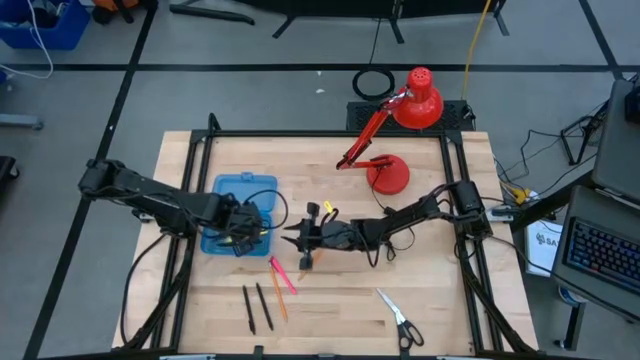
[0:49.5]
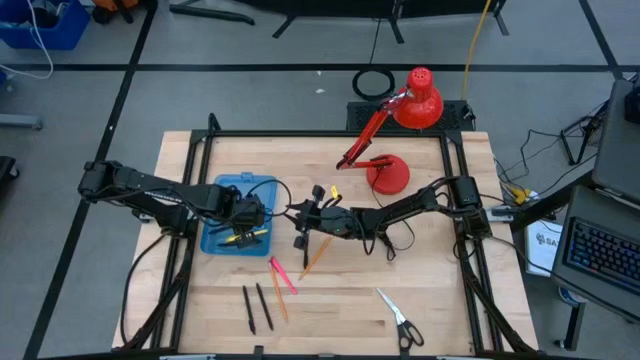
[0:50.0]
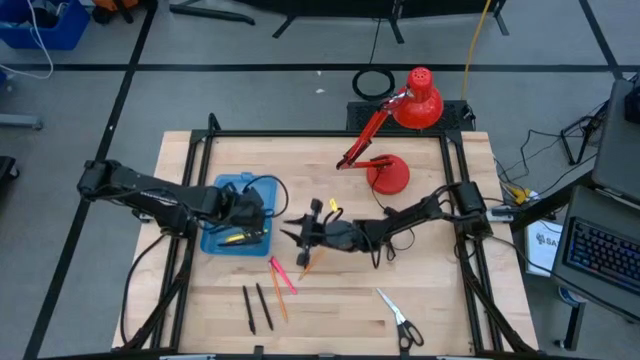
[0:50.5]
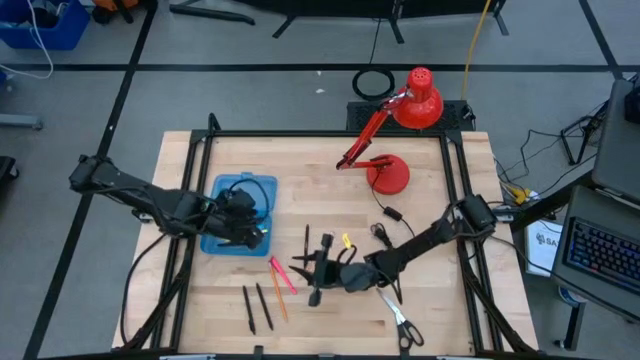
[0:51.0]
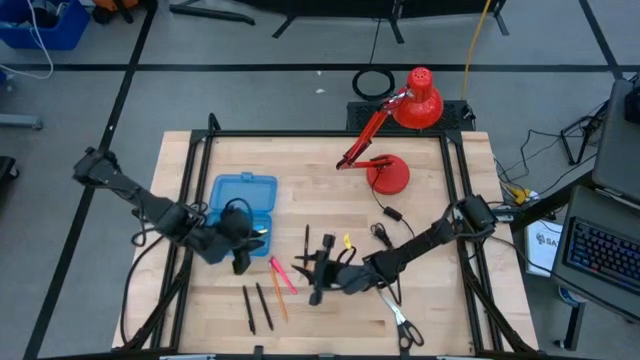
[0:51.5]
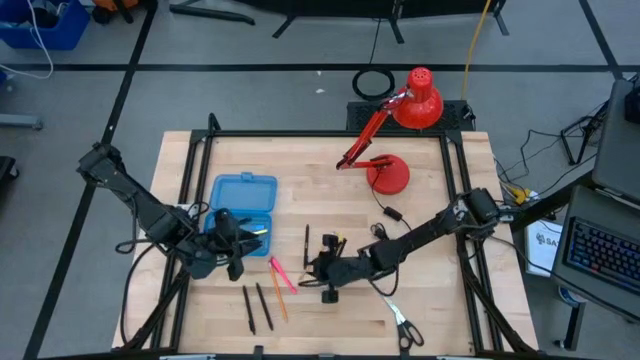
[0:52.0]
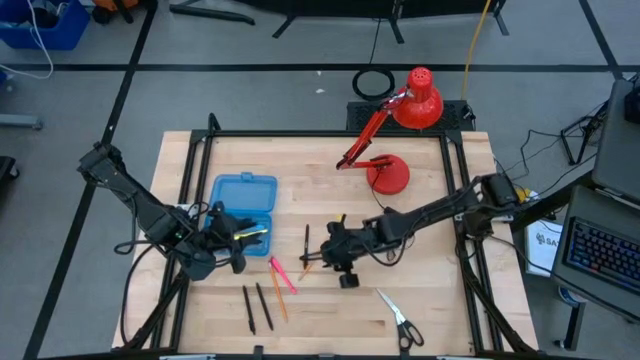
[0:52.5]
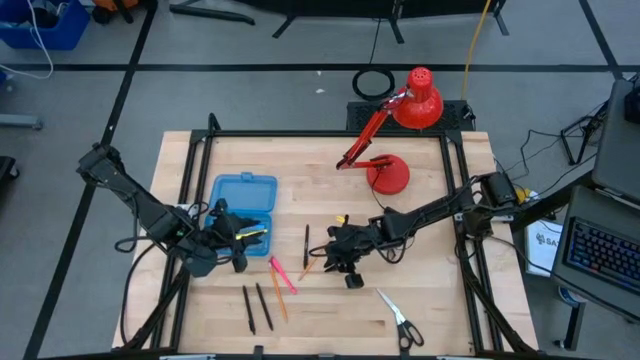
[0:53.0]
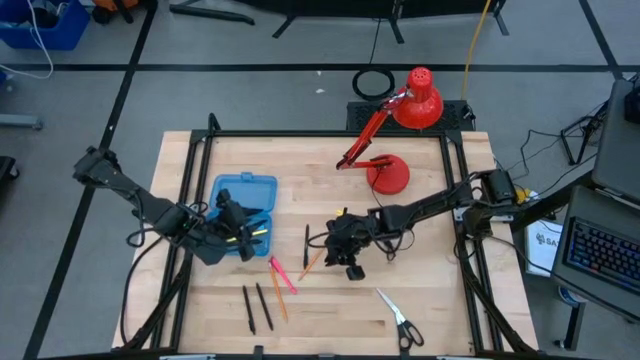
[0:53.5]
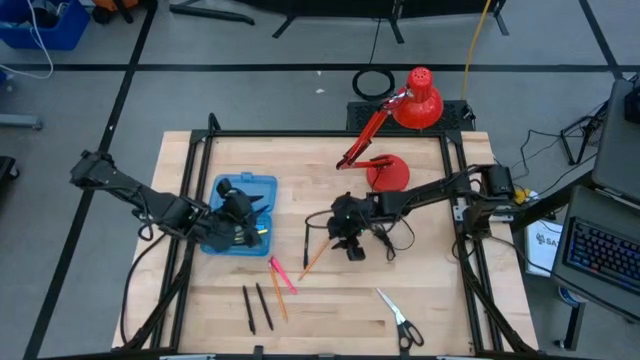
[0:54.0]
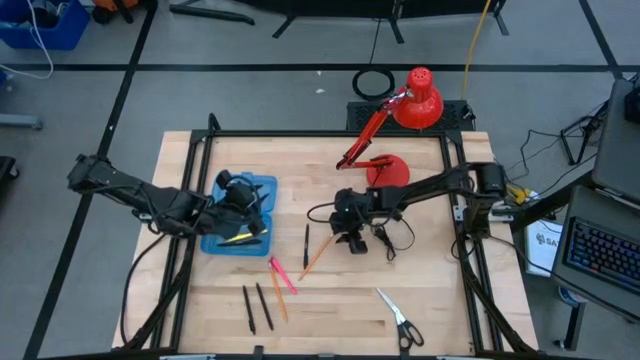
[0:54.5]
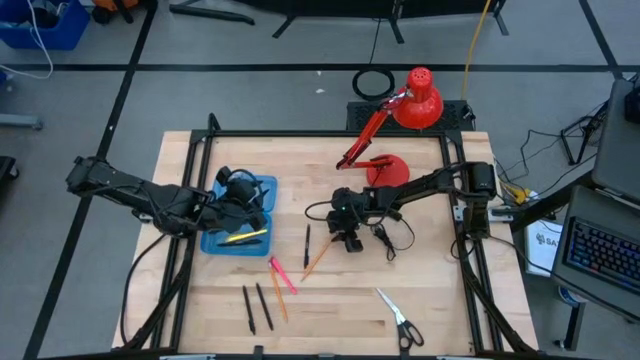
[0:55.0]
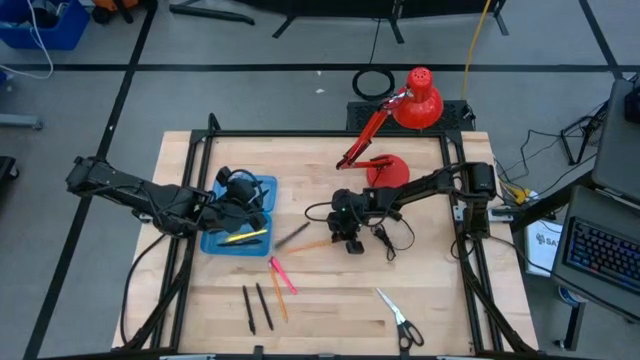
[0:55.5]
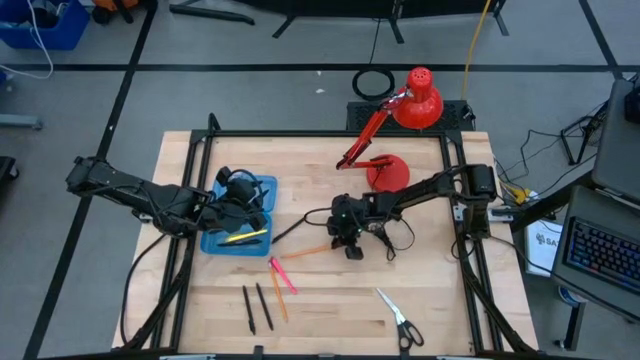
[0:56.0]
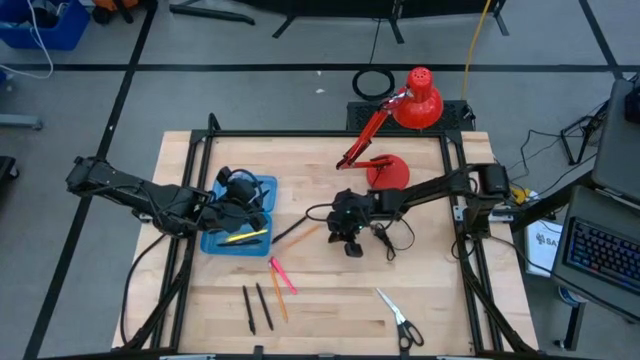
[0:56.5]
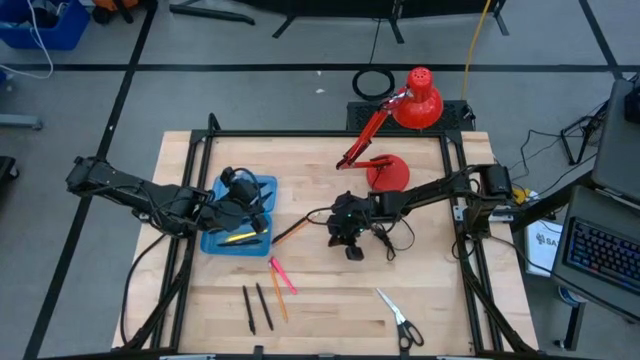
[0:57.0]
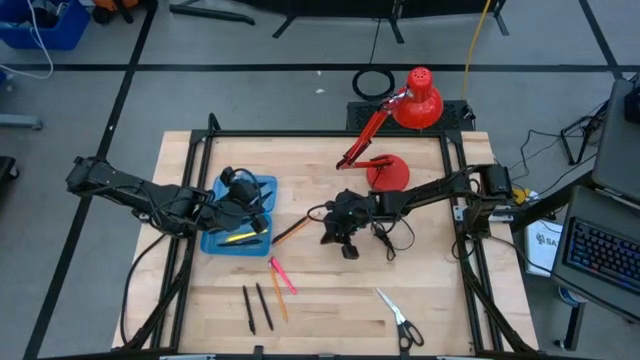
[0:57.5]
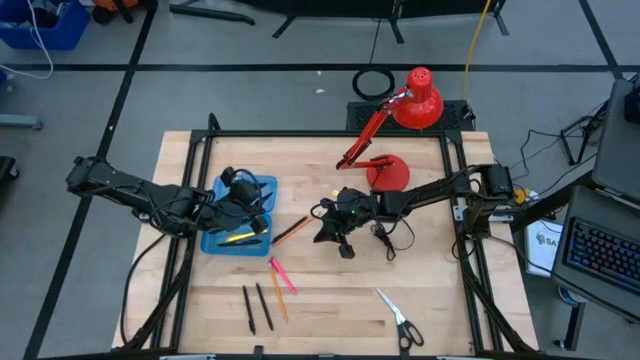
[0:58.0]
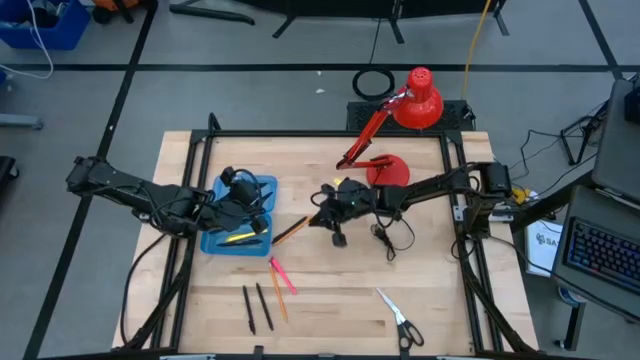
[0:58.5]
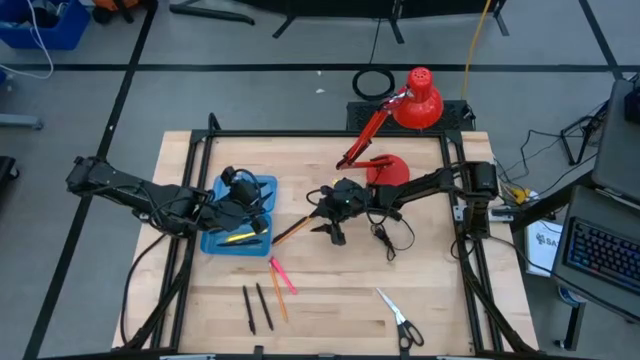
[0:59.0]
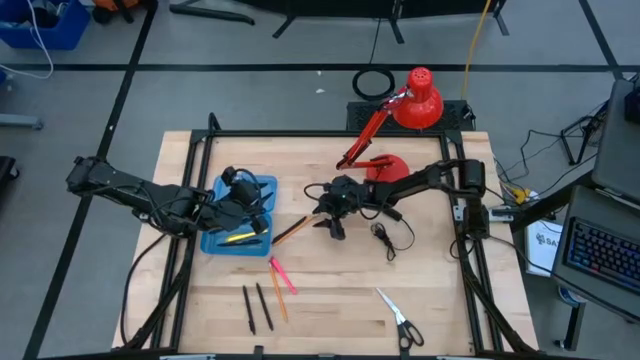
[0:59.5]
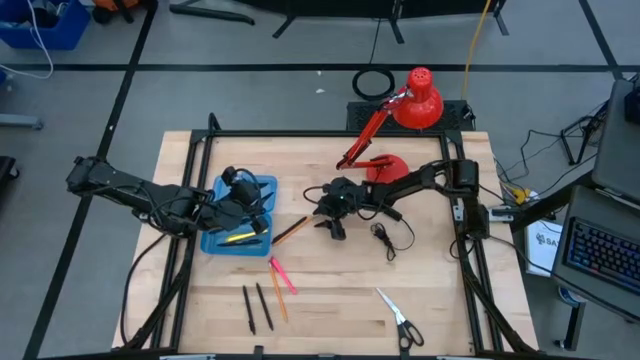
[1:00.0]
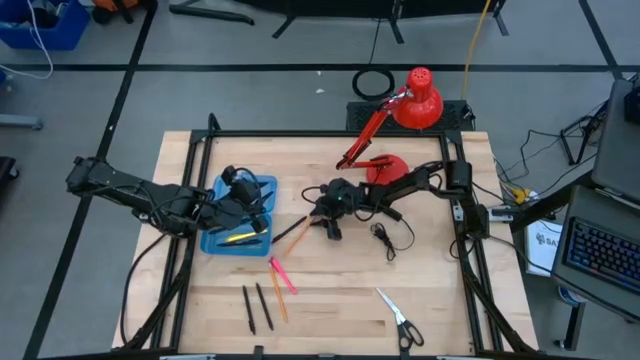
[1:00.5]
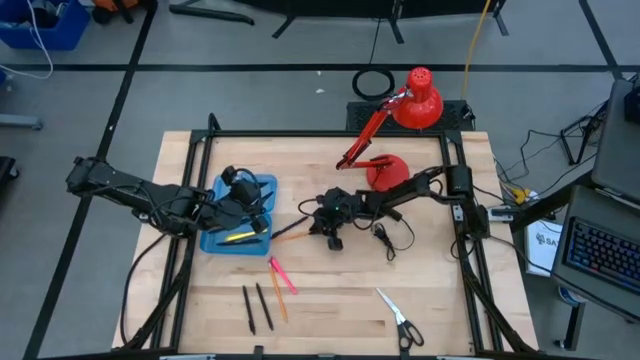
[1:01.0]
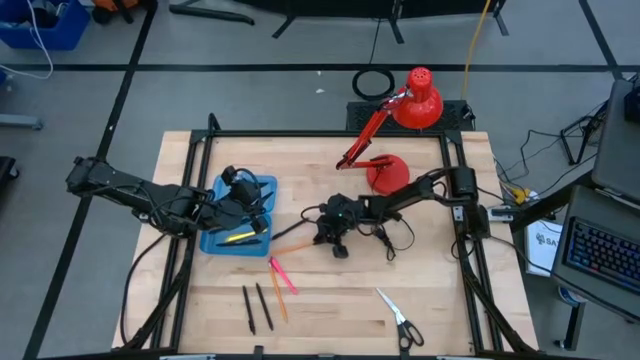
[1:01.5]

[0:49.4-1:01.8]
Task: Pick & place school supplies into a supply box
Put the yellow pencil into the blue supply box

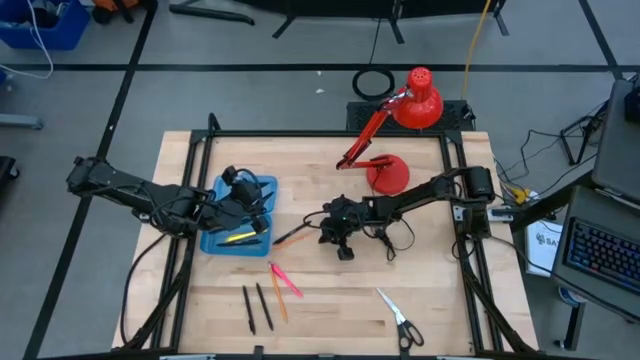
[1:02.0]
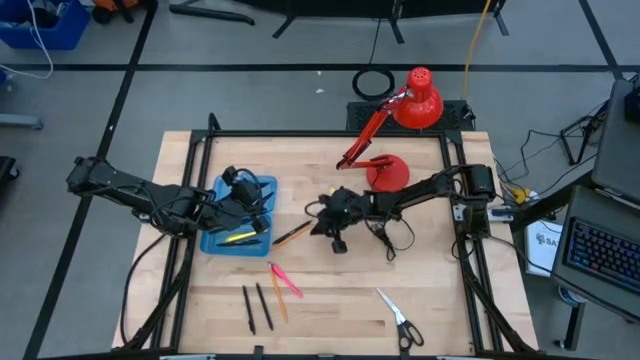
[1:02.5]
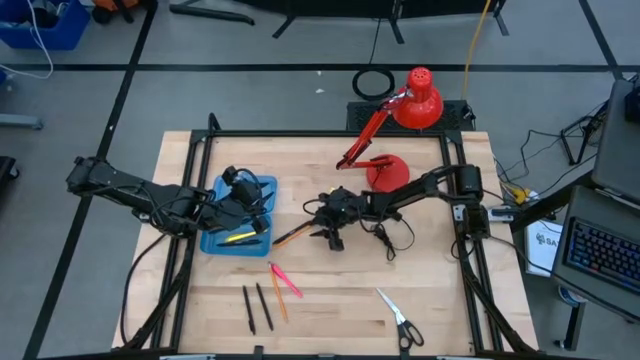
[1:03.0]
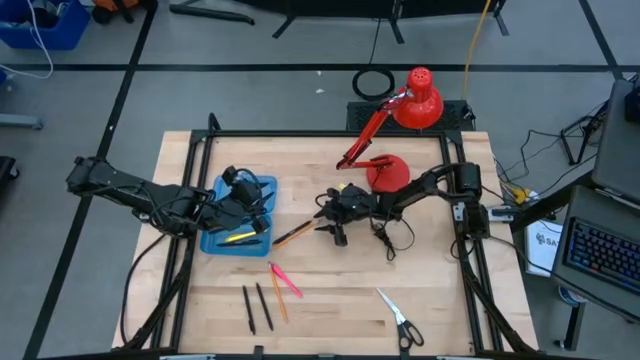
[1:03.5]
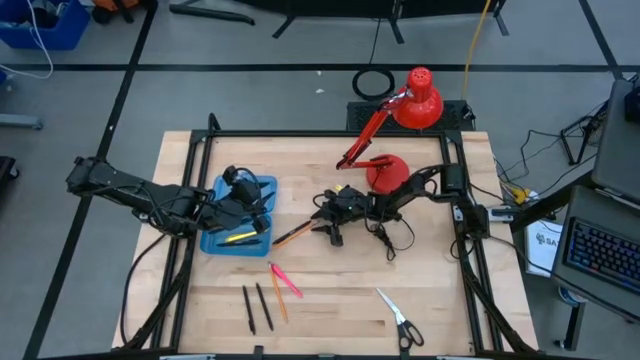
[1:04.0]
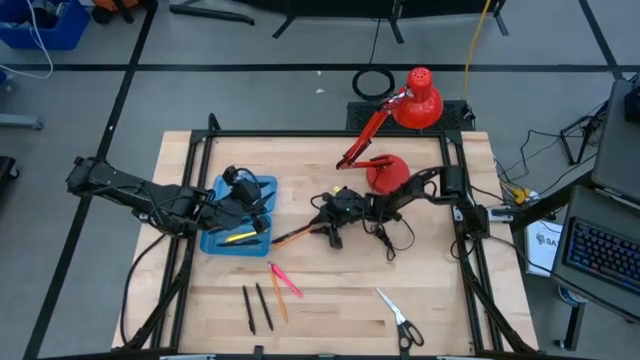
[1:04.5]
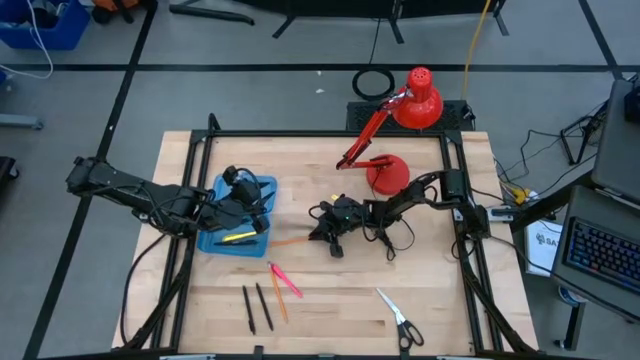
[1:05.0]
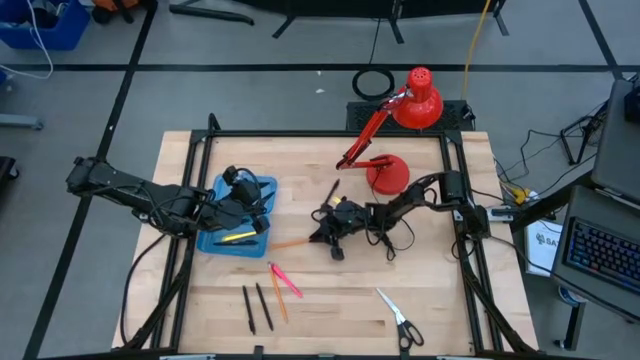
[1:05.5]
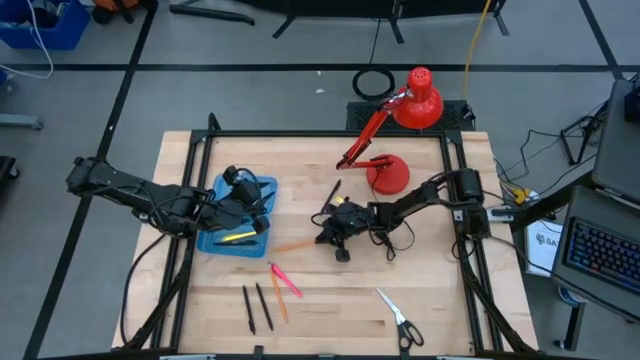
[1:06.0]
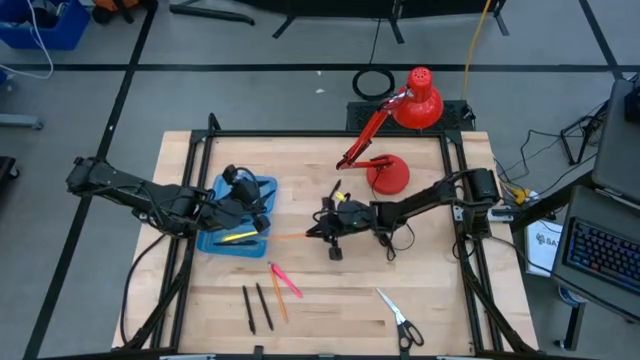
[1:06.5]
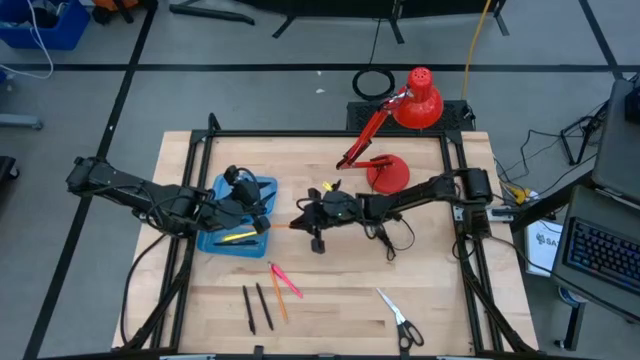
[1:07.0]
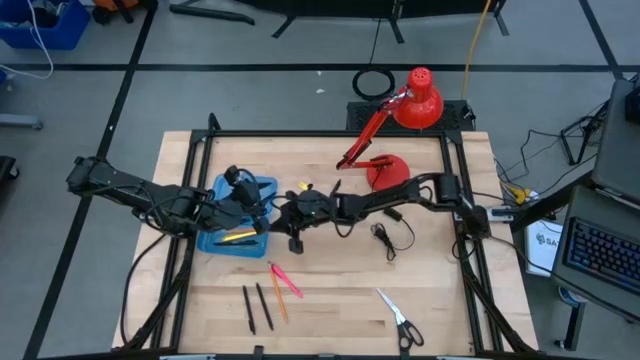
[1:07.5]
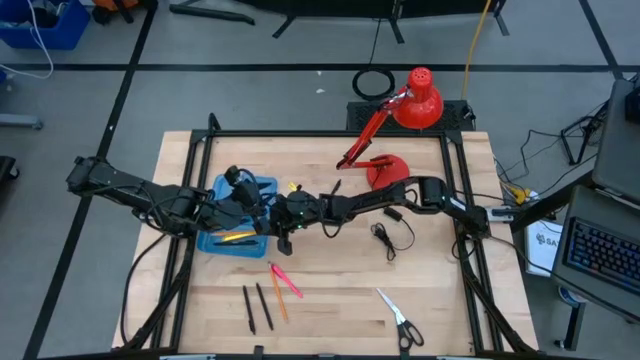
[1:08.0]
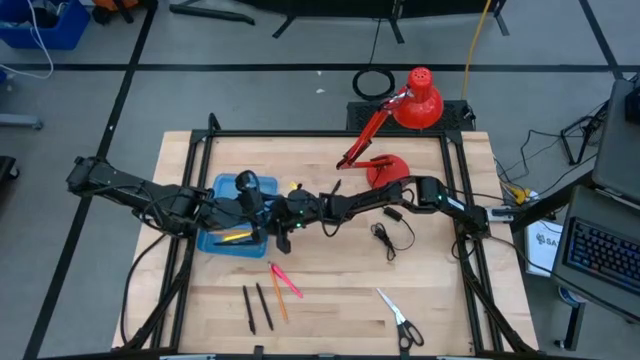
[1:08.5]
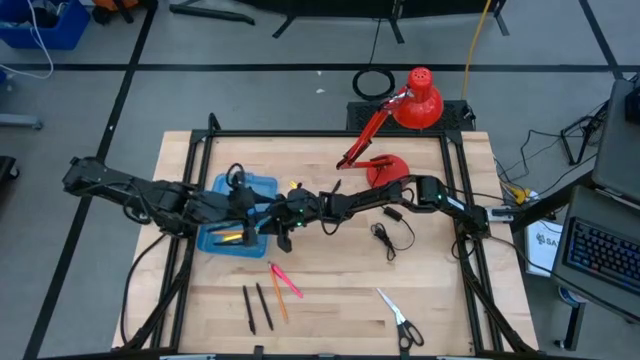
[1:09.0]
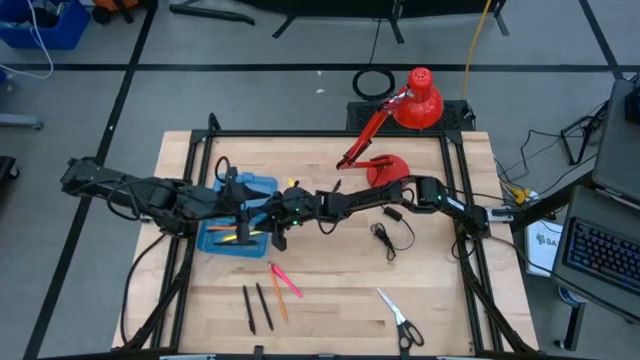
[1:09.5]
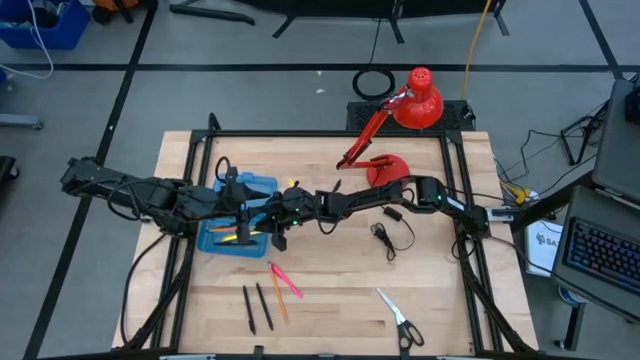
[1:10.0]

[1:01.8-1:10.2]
Put the yellow pencil into the blue supply box
